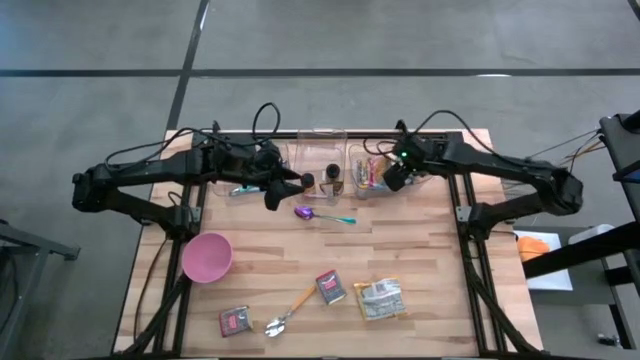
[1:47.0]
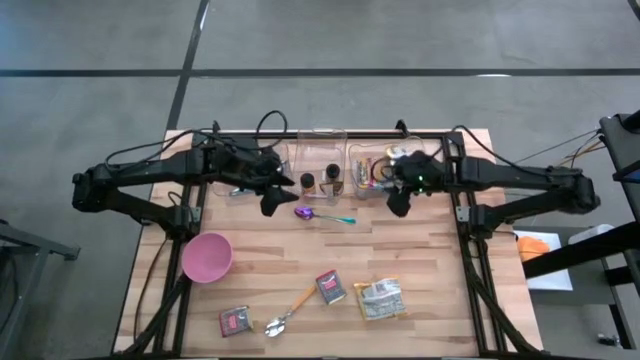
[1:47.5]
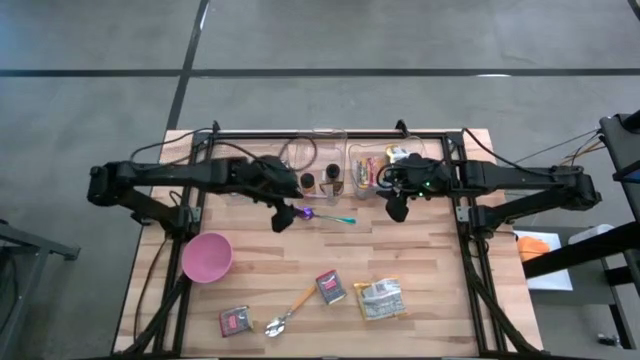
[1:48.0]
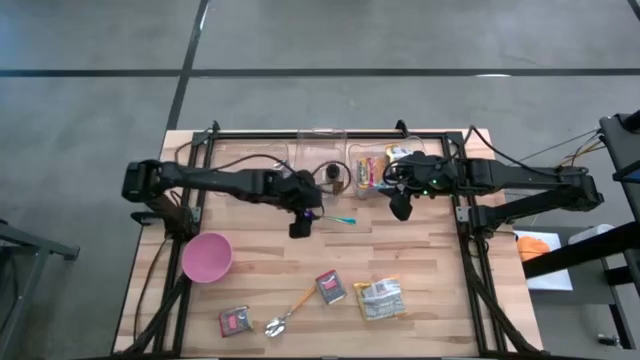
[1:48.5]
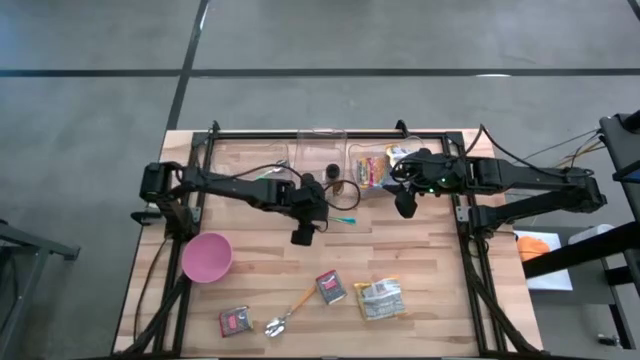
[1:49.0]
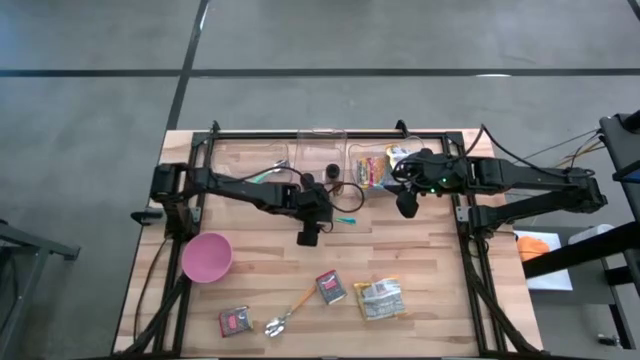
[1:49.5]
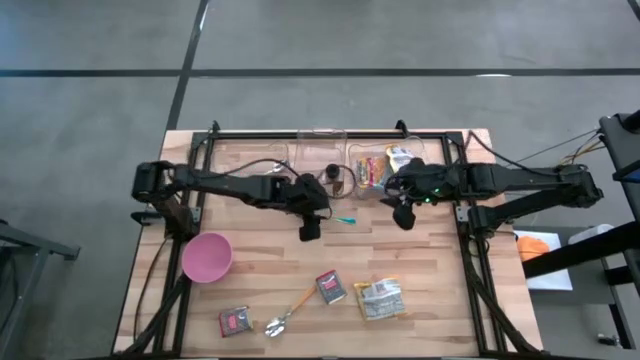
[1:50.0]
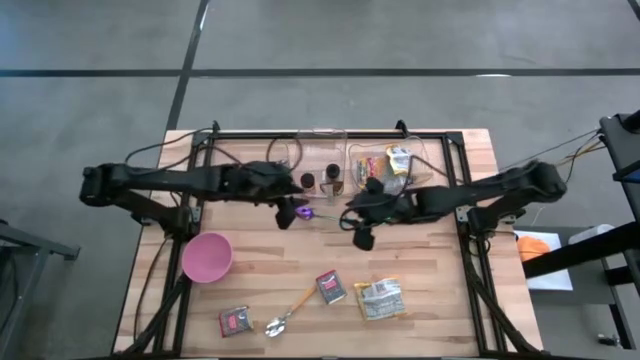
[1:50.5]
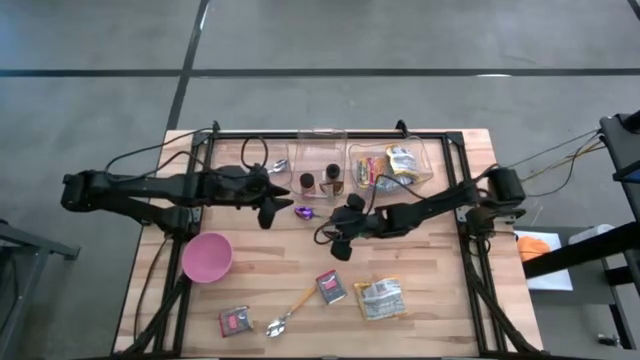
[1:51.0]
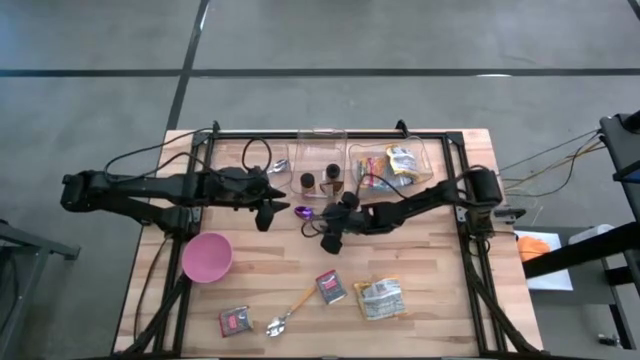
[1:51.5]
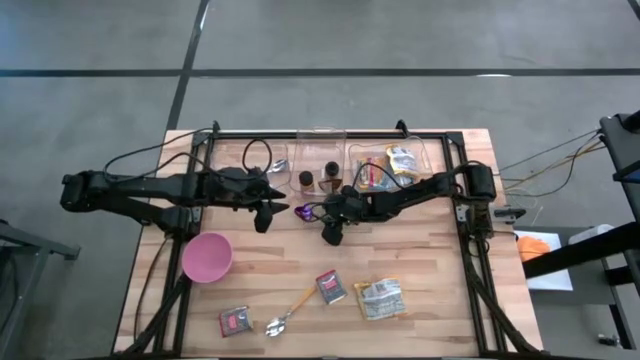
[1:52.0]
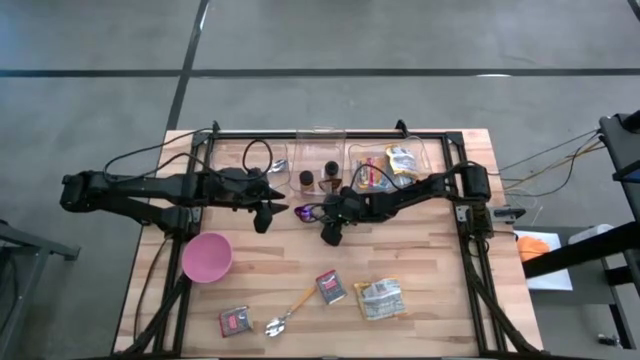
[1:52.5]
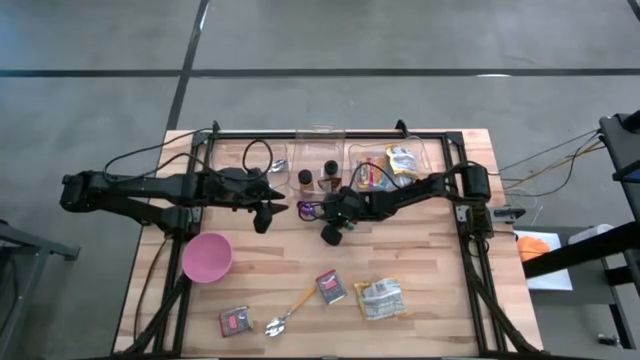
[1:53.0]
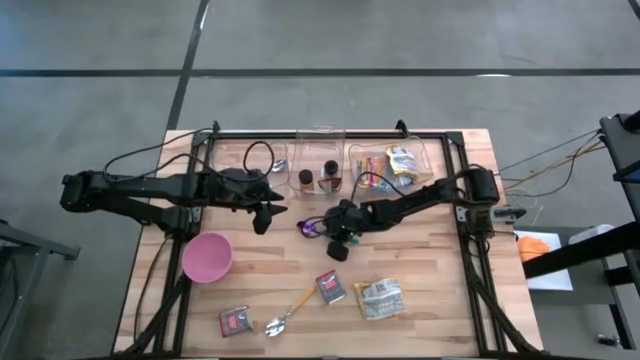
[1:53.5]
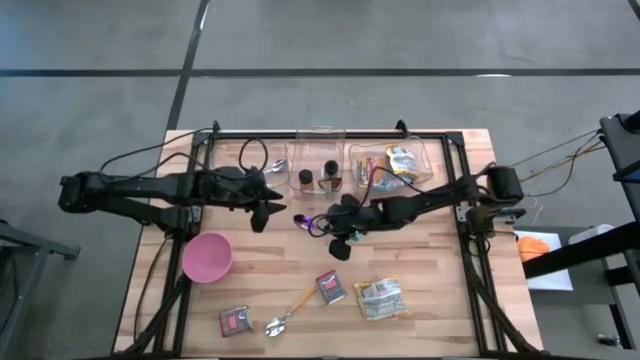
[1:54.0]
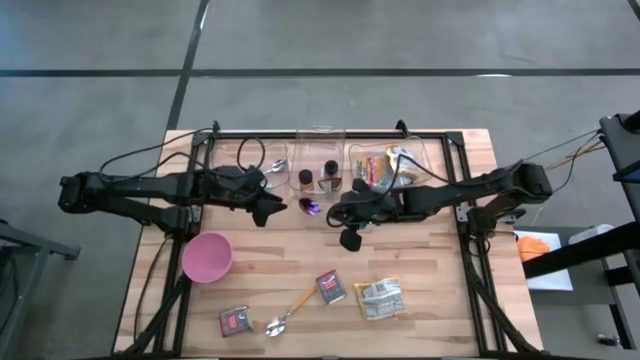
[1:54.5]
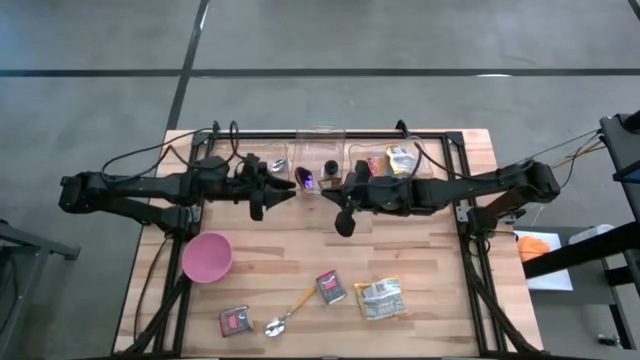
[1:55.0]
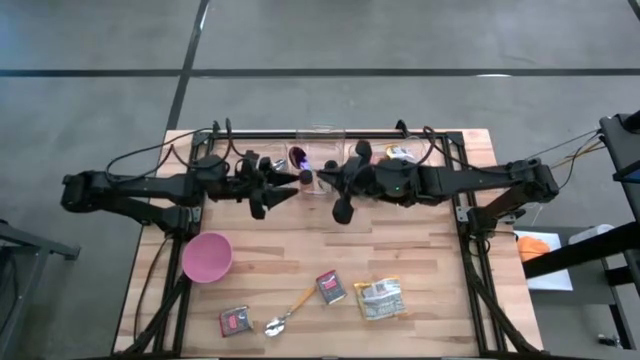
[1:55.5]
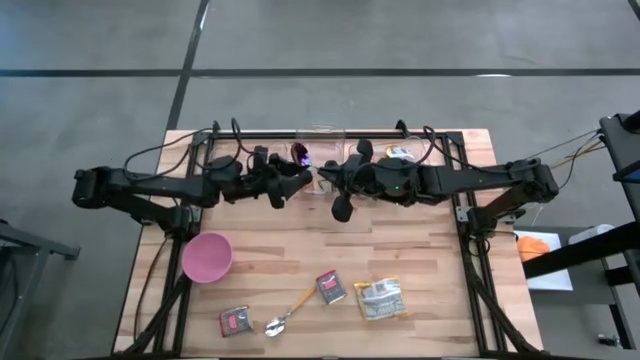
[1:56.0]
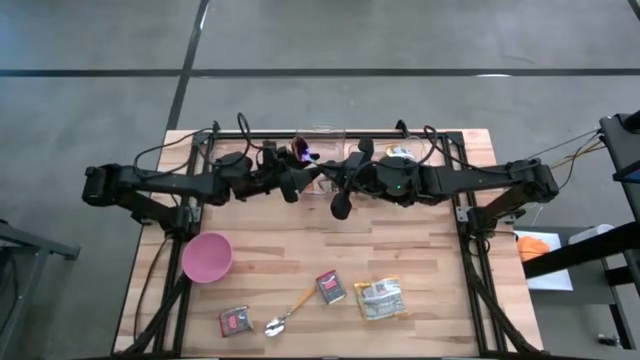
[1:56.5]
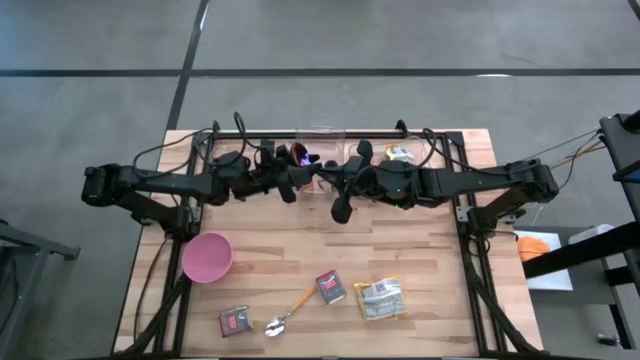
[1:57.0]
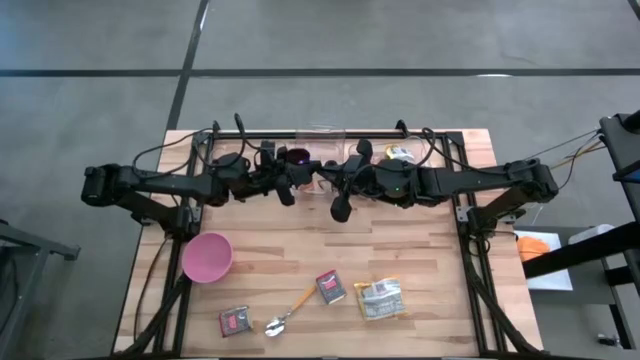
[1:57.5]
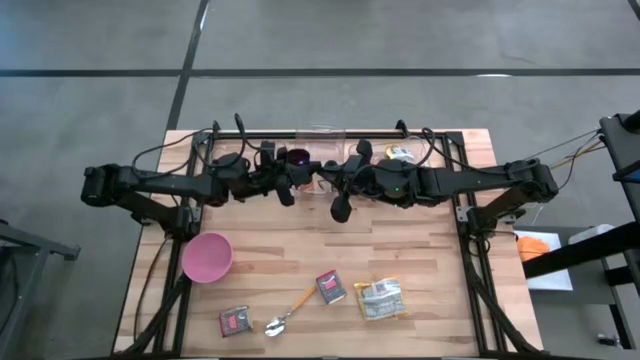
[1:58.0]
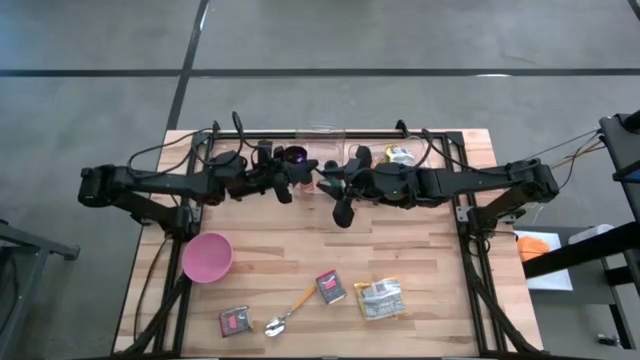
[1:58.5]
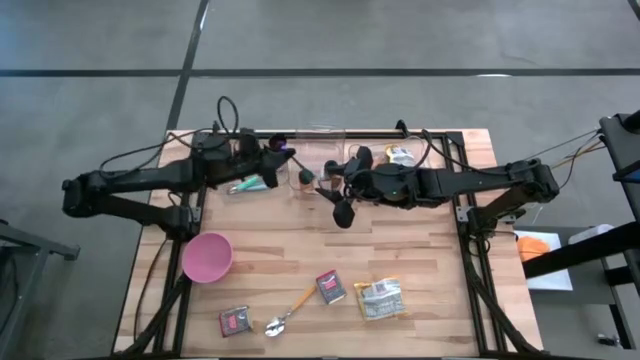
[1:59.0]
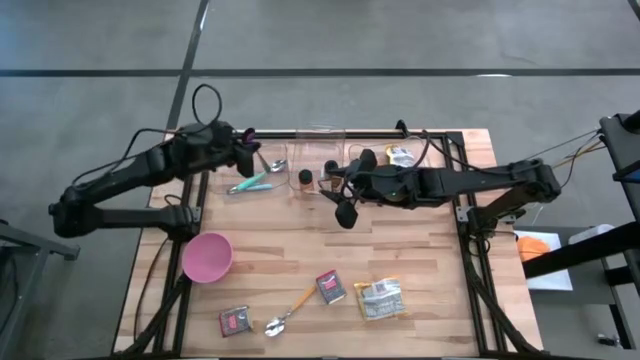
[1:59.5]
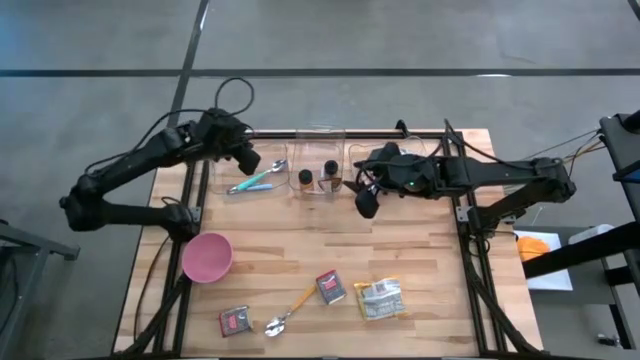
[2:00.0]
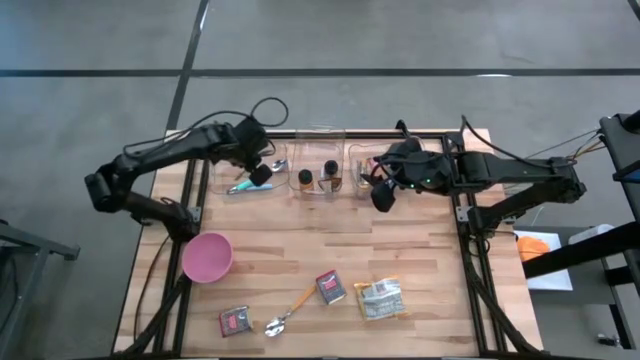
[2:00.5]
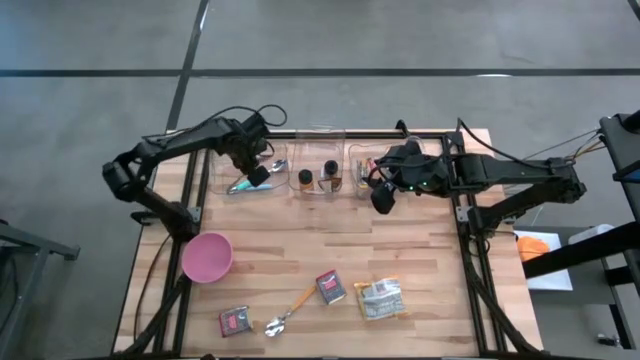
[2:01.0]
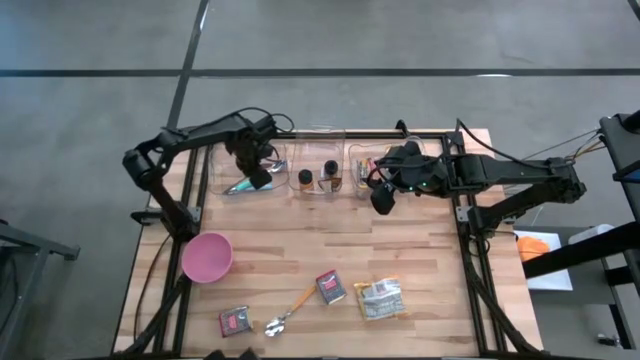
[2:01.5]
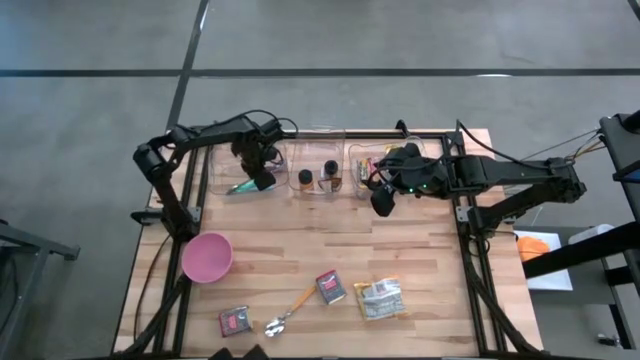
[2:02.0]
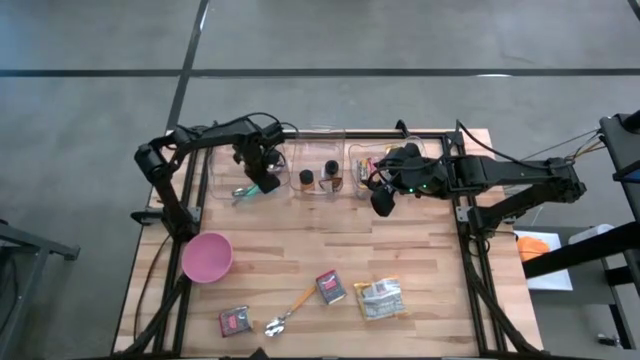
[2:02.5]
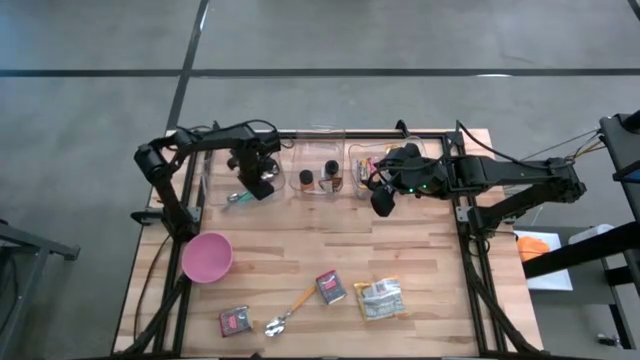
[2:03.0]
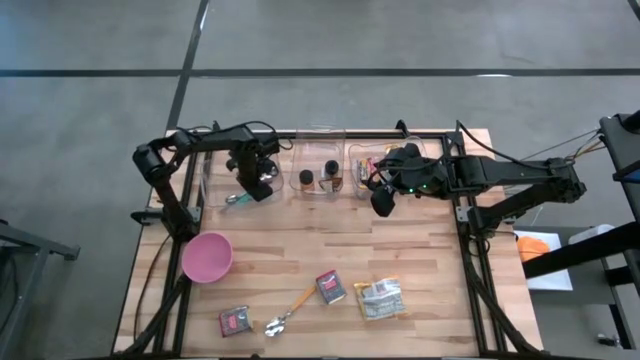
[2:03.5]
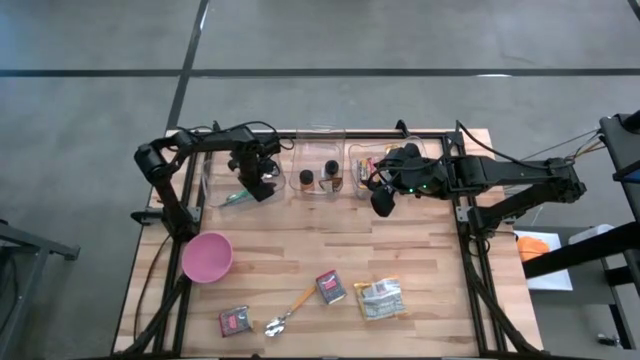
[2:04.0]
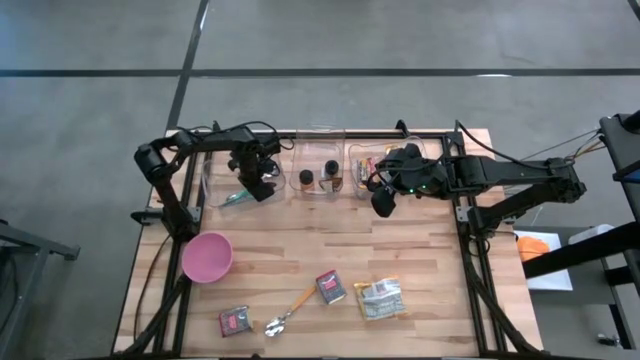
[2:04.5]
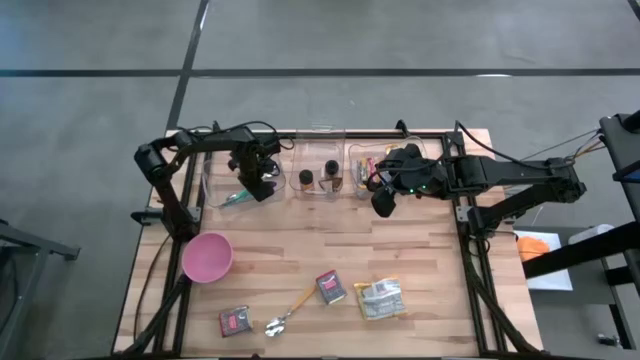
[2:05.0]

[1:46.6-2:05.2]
Put the blue spoon into the left transparent bin
